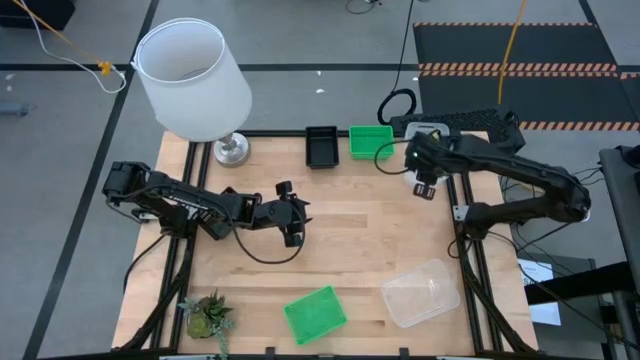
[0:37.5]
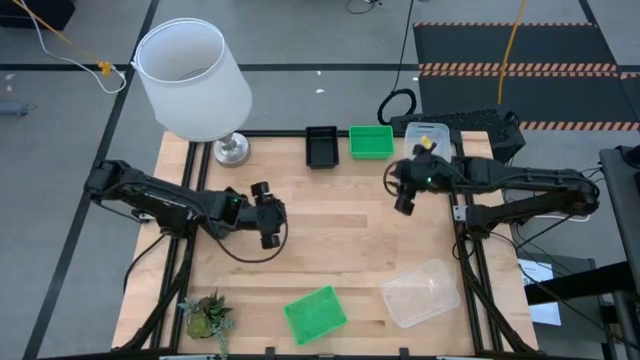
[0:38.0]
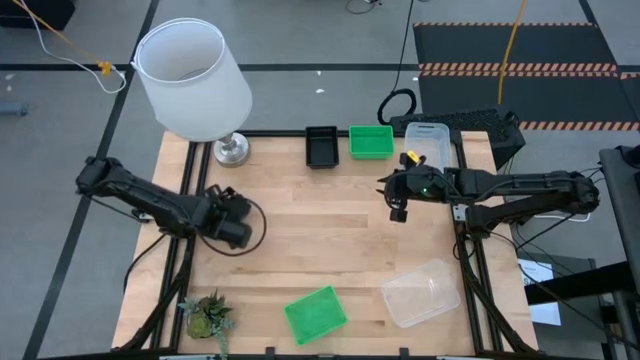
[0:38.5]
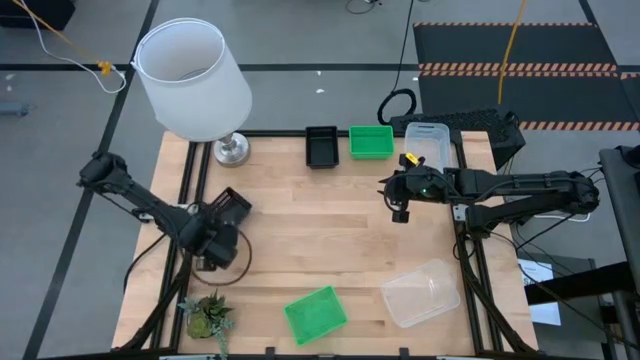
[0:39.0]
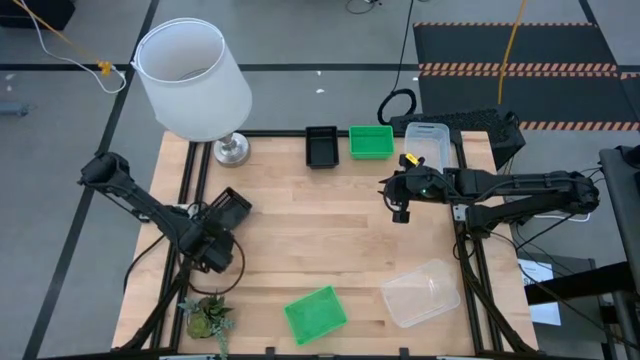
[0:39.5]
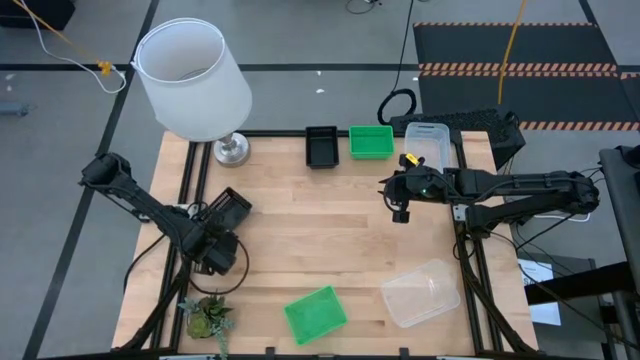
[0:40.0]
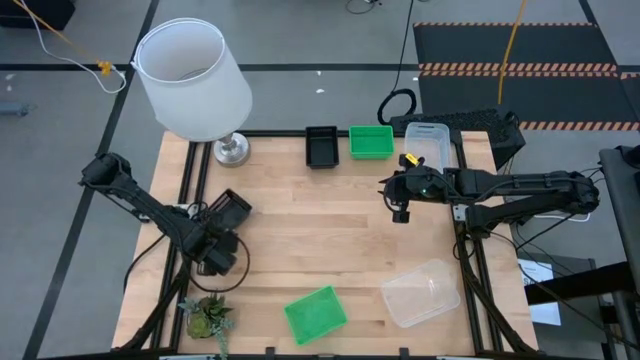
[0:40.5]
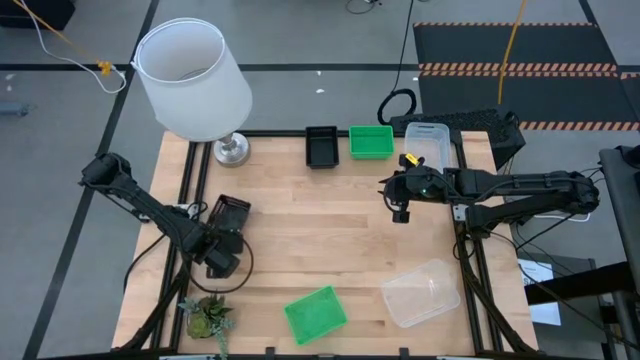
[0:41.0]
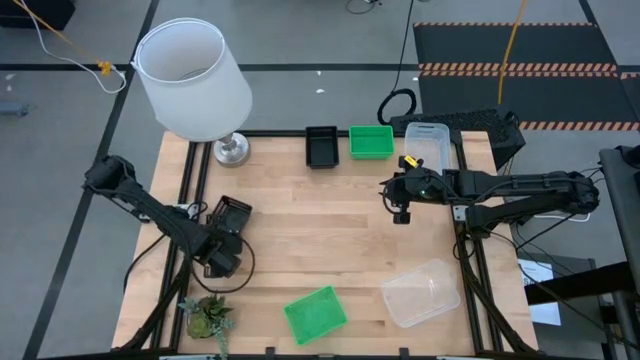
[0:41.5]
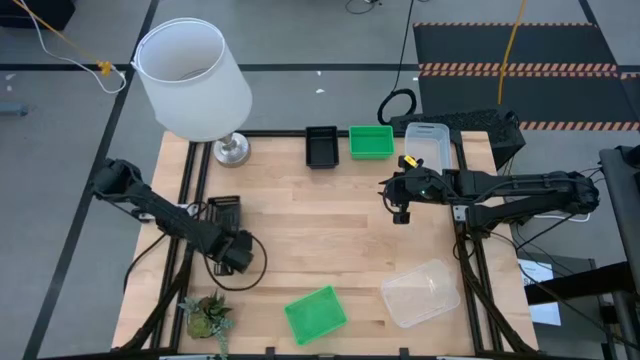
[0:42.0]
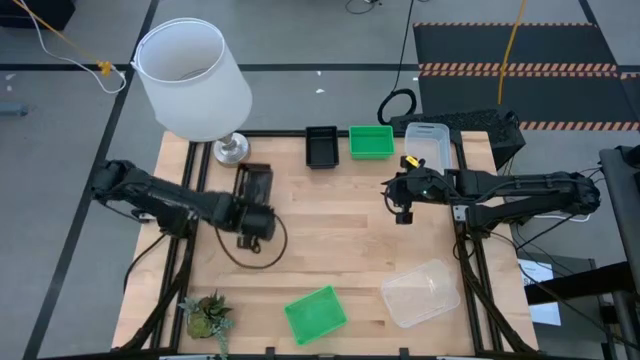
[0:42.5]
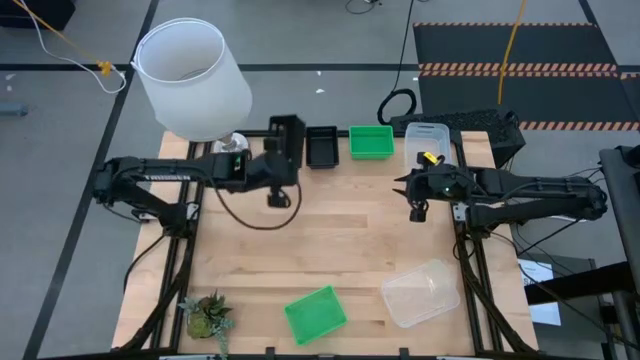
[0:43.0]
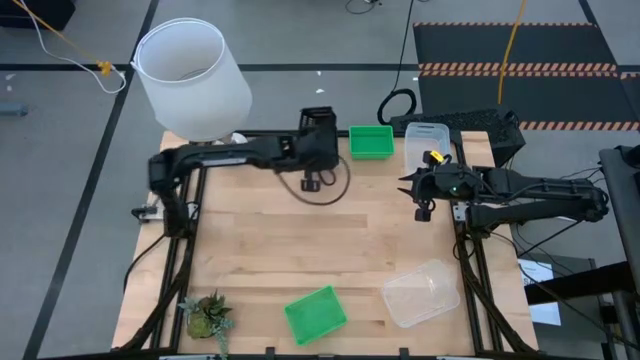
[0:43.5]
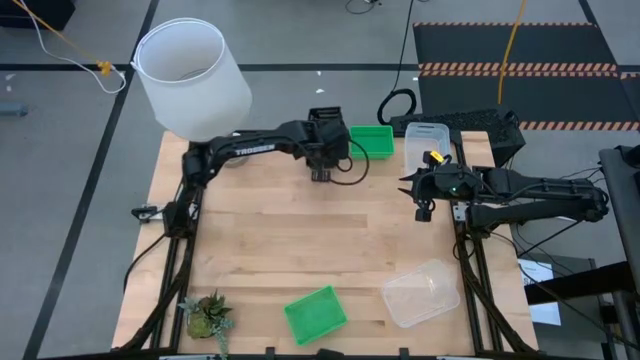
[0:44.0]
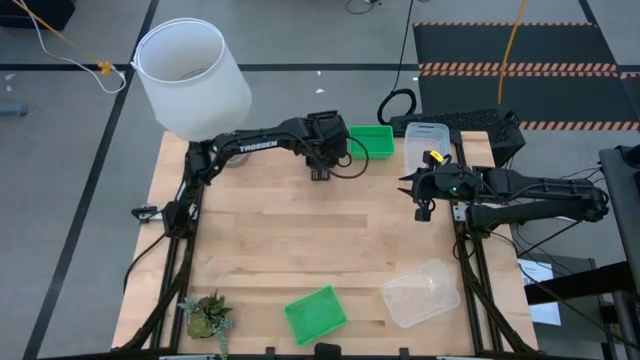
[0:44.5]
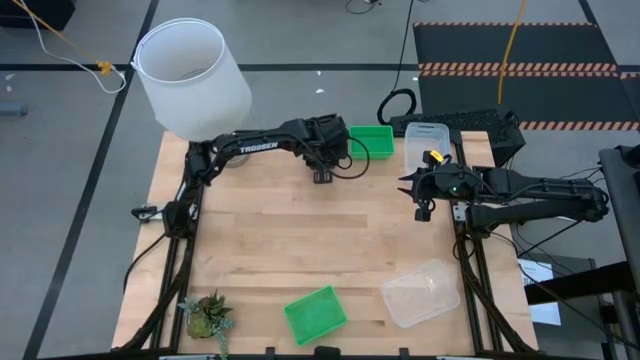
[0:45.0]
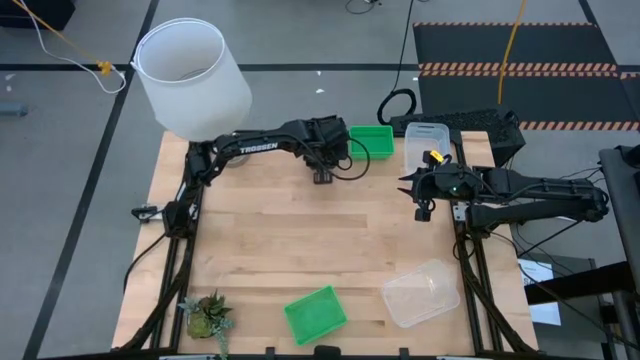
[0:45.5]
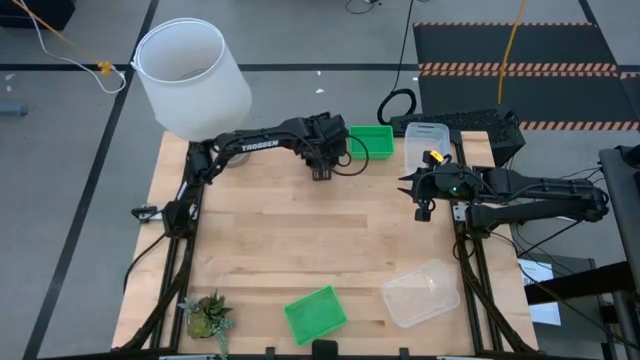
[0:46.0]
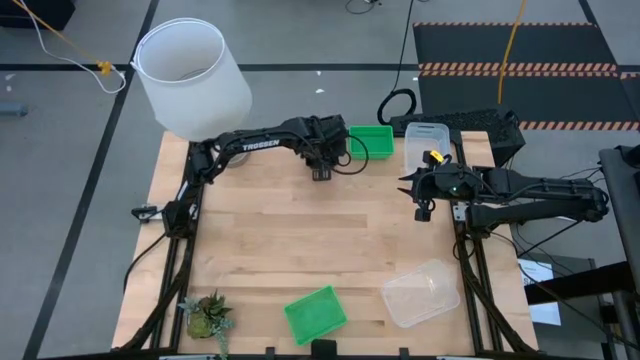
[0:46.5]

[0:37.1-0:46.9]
Stack the bottom black bin on top of the top black bin

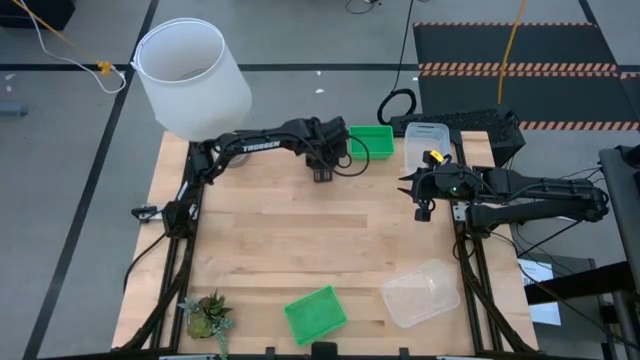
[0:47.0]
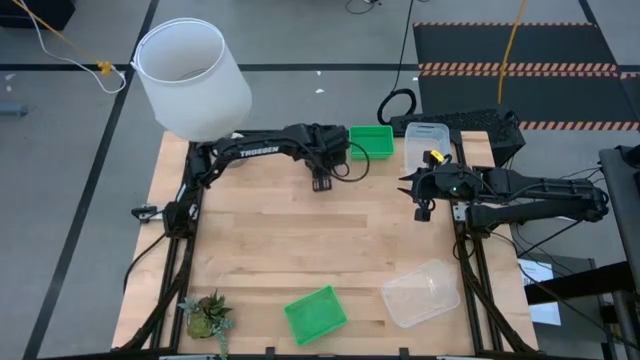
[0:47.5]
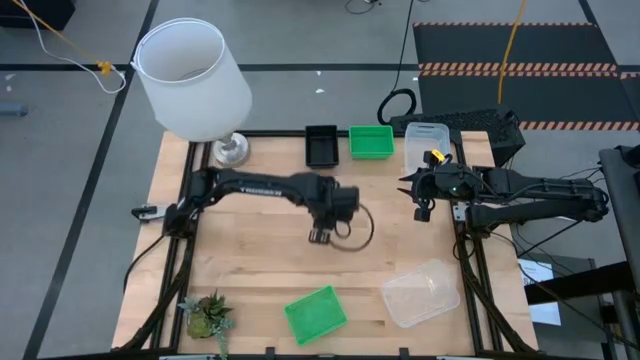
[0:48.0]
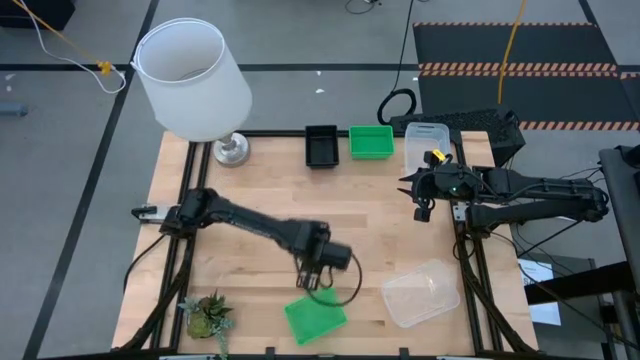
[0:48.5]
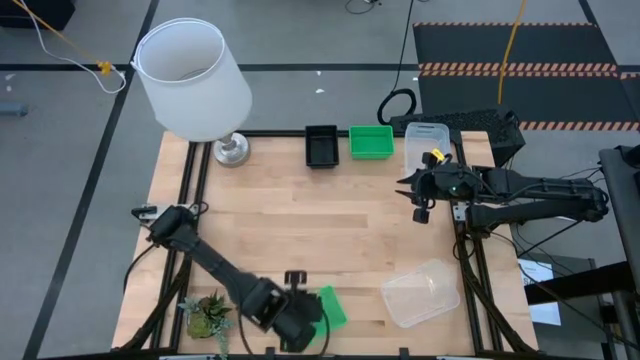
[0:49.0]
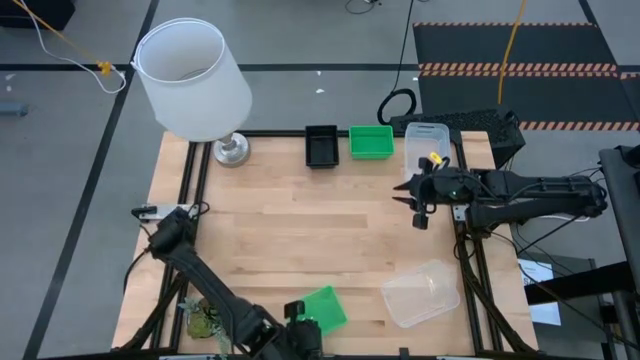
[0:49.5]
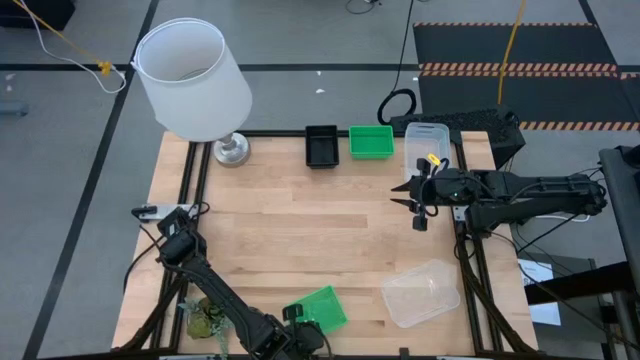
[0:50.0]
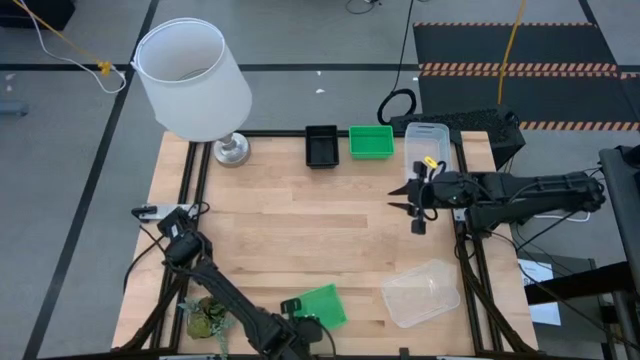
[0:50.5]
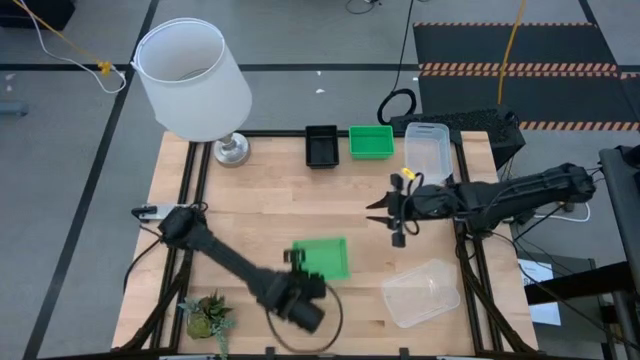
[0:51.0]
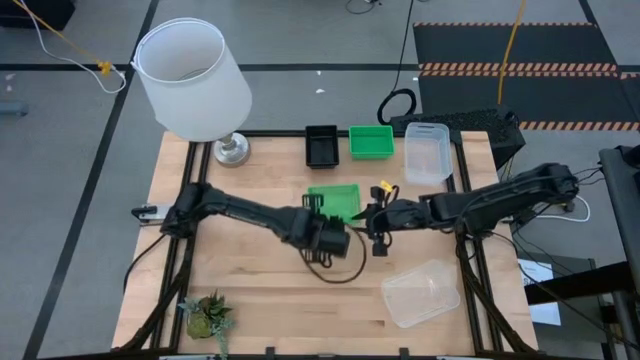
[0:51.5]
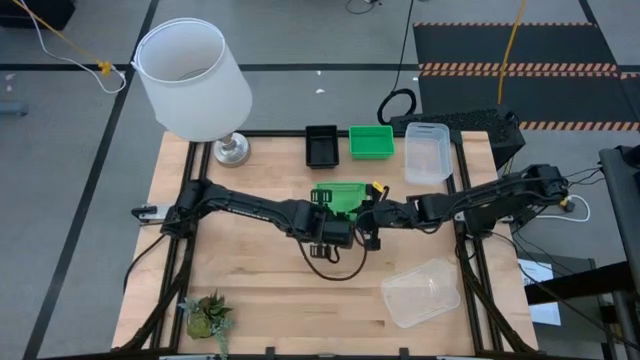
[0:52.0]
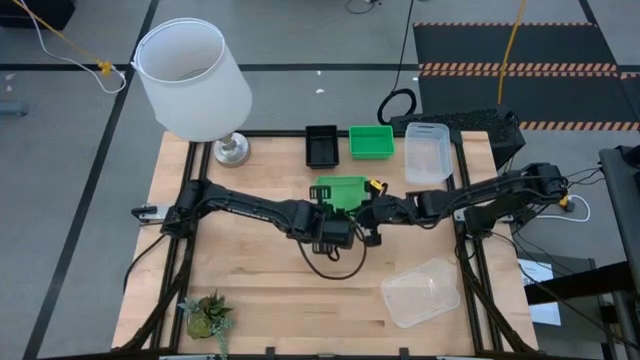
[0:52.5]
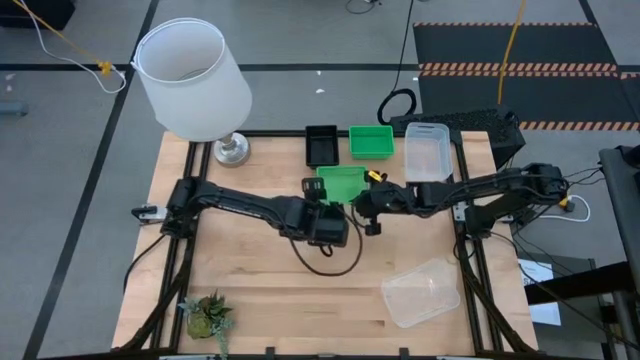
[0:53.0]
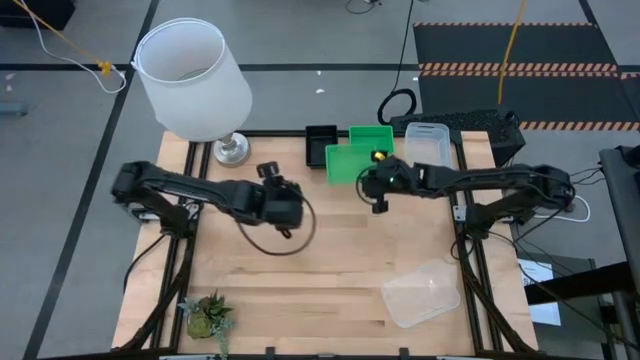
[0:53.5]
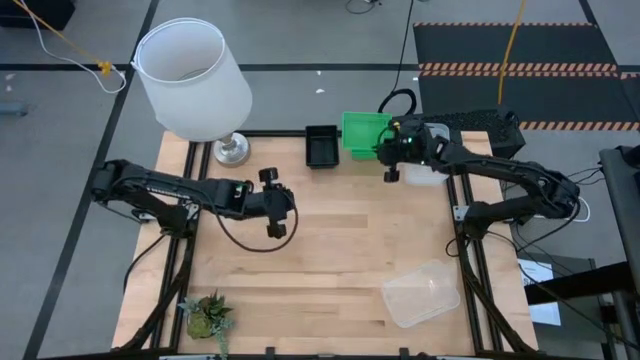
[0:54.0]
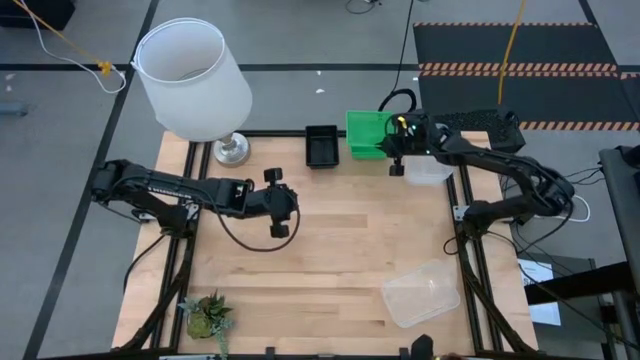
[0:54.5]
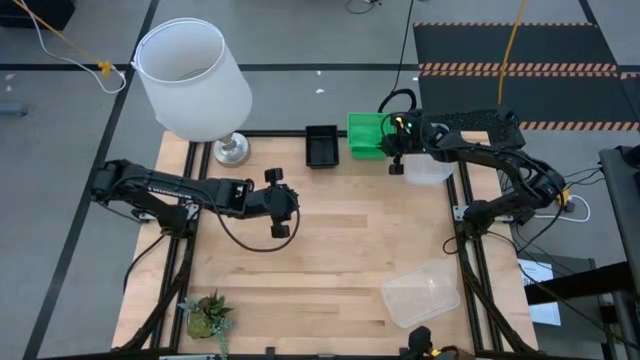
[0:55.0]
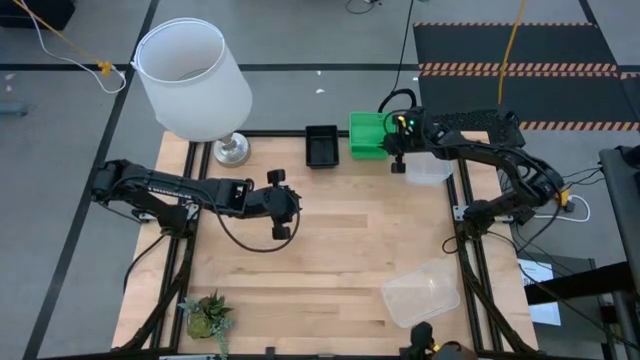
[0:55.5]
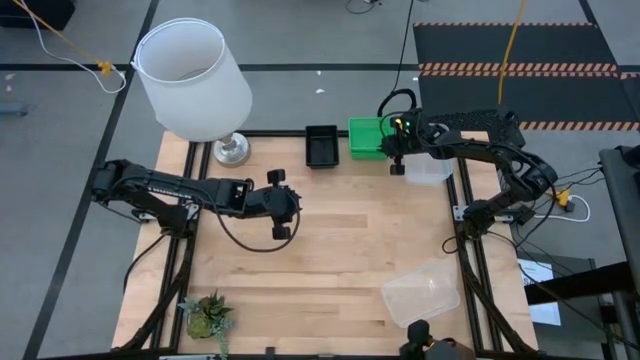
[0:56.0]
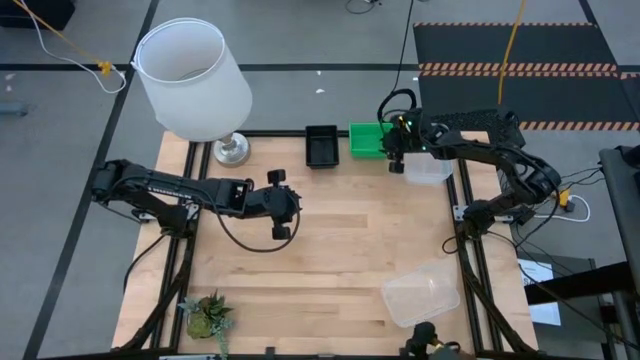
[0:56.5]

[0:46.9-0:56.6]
Stack the bottom green bin on top of the top green bin
